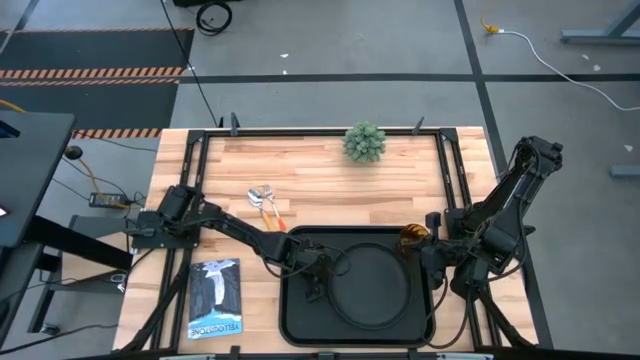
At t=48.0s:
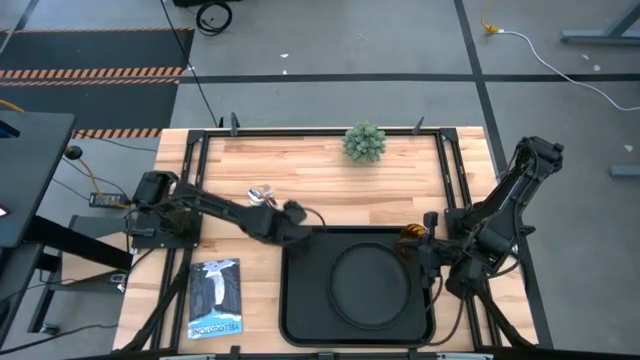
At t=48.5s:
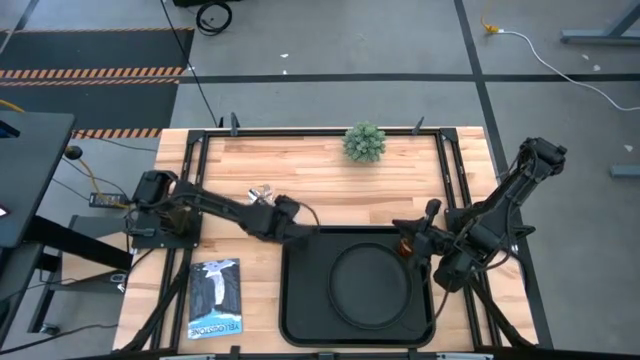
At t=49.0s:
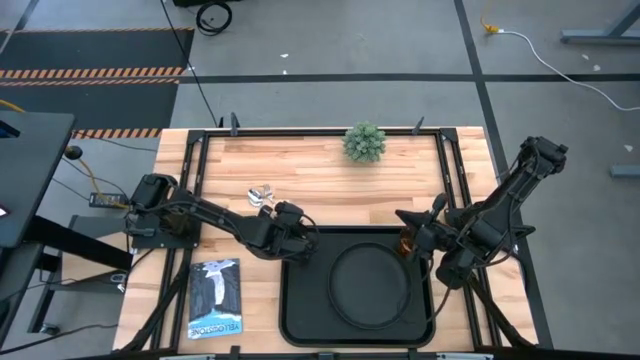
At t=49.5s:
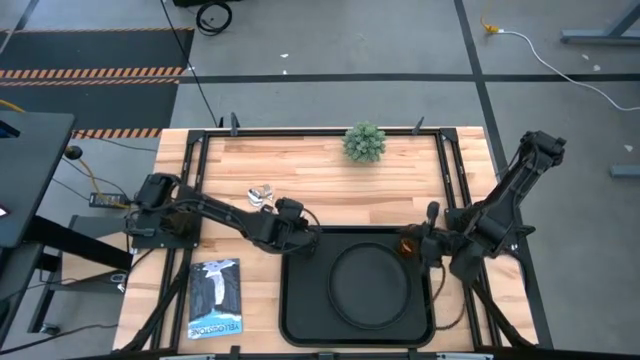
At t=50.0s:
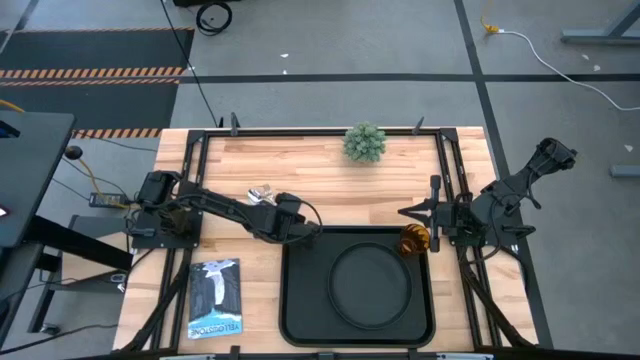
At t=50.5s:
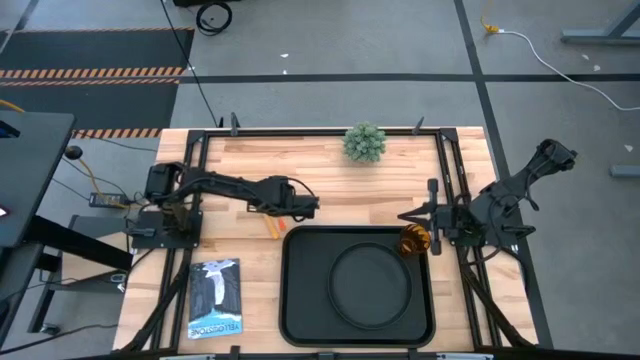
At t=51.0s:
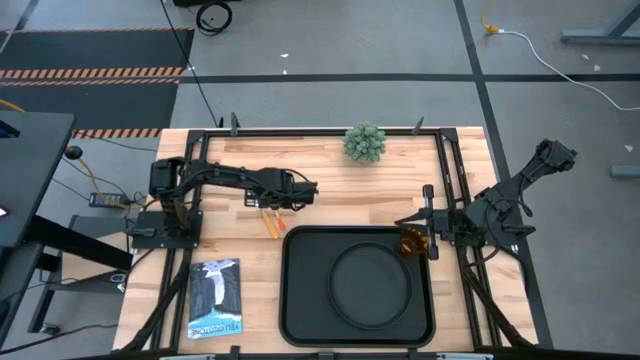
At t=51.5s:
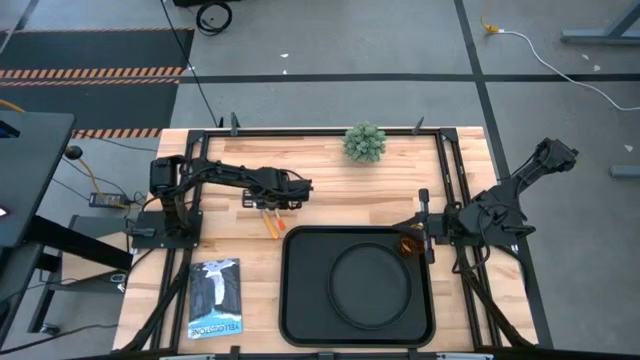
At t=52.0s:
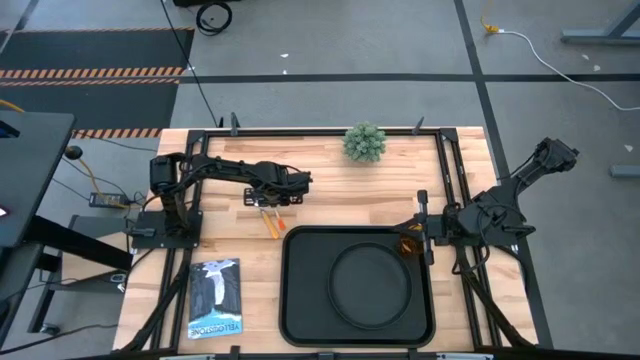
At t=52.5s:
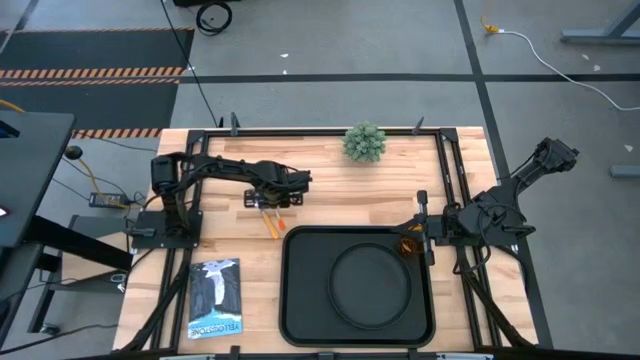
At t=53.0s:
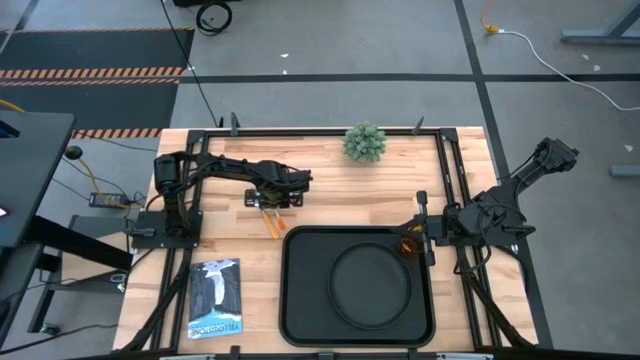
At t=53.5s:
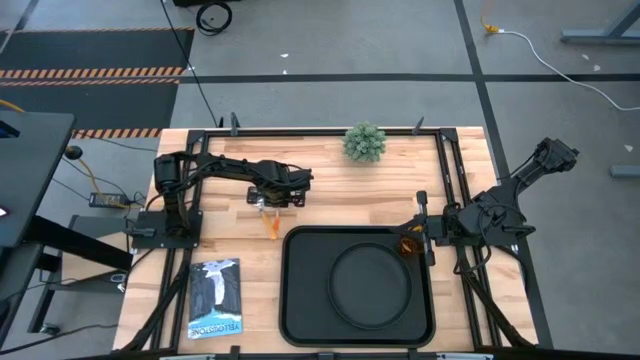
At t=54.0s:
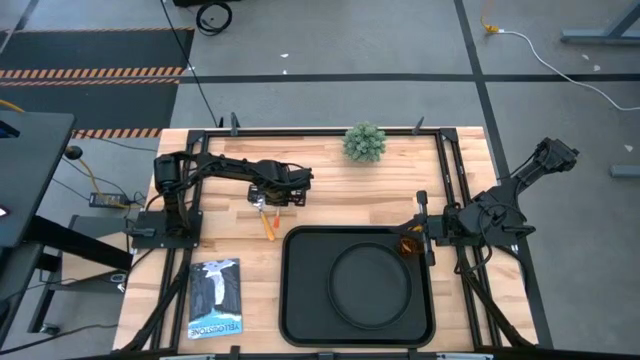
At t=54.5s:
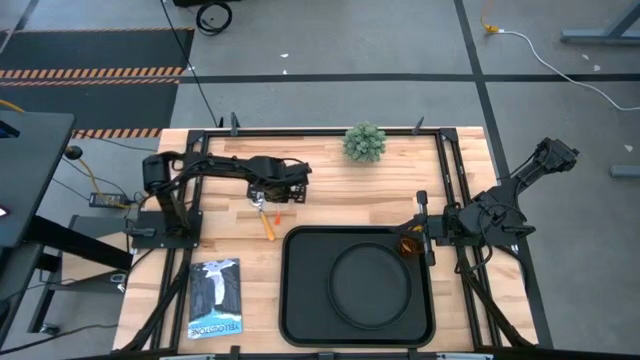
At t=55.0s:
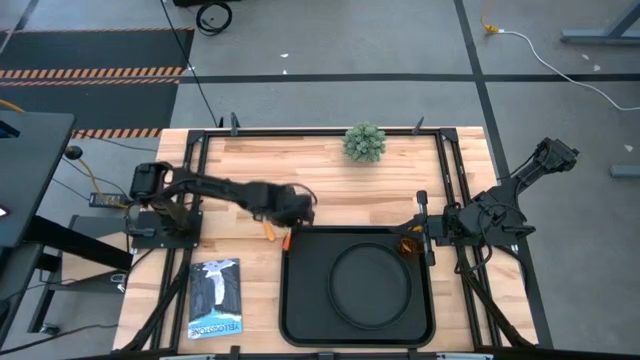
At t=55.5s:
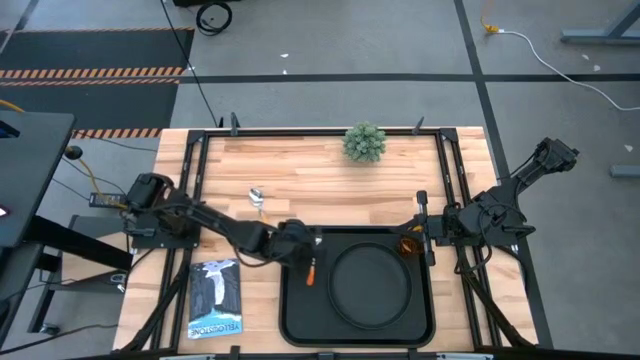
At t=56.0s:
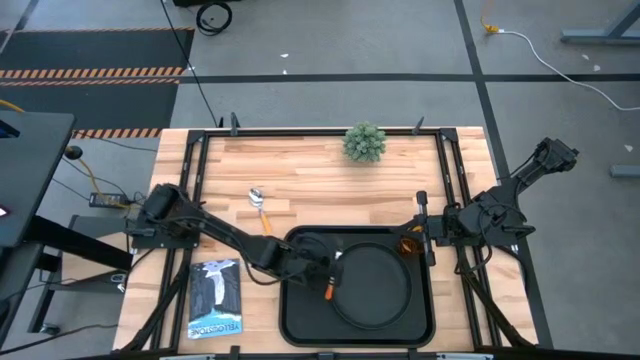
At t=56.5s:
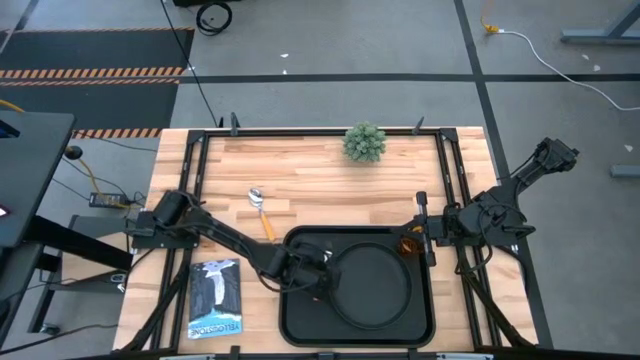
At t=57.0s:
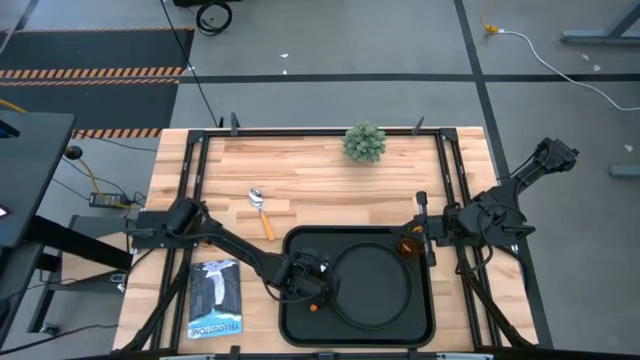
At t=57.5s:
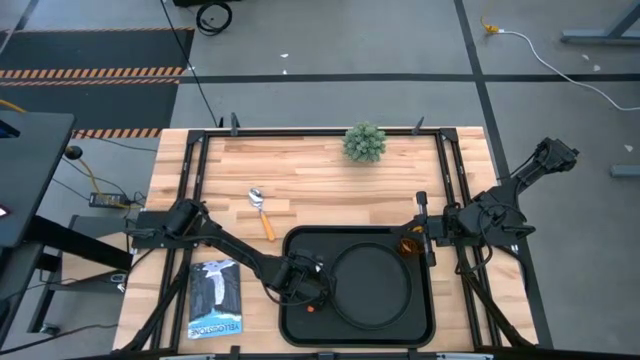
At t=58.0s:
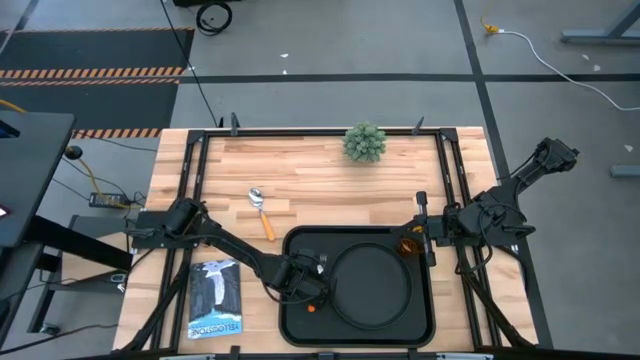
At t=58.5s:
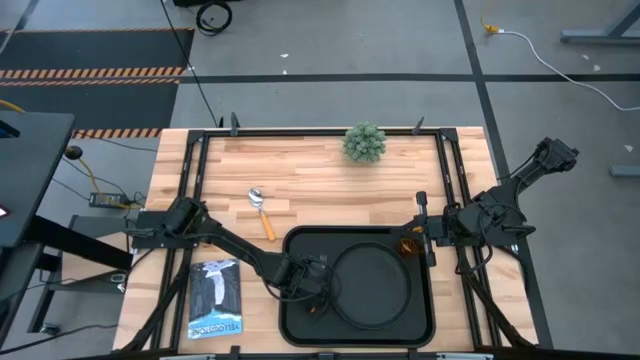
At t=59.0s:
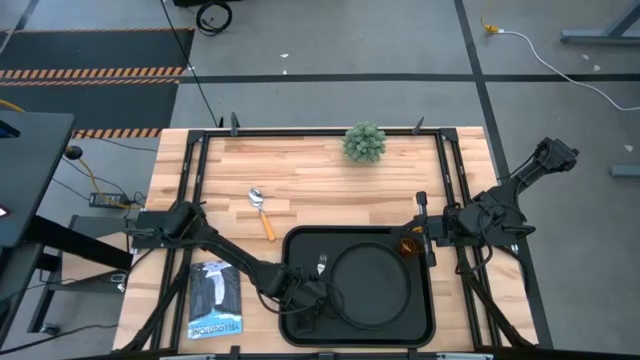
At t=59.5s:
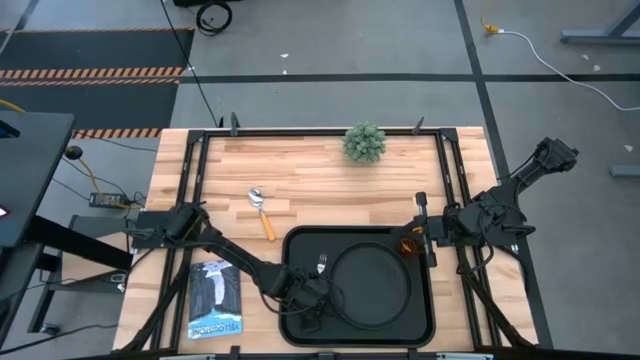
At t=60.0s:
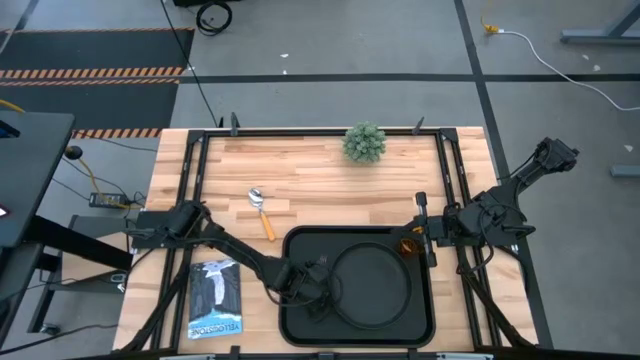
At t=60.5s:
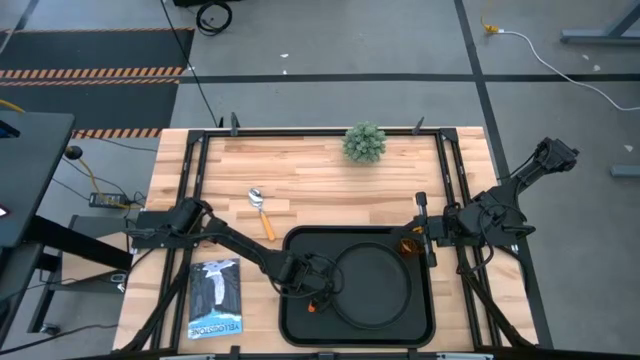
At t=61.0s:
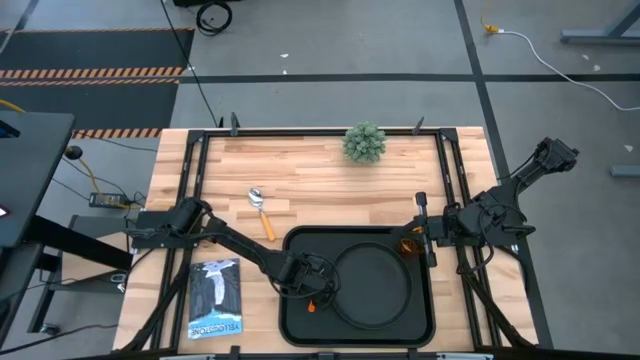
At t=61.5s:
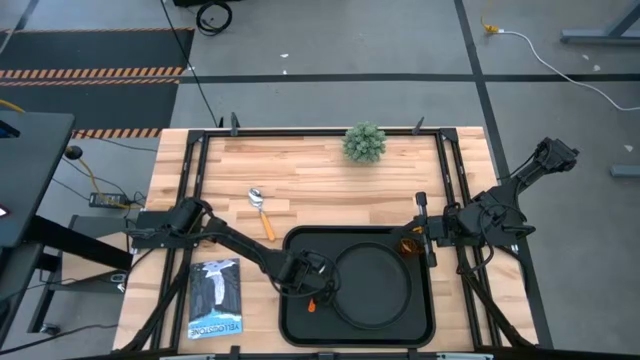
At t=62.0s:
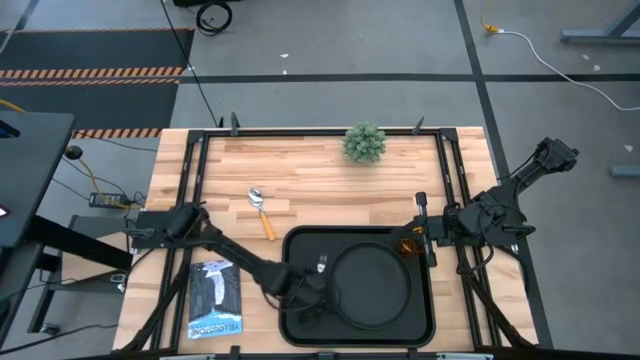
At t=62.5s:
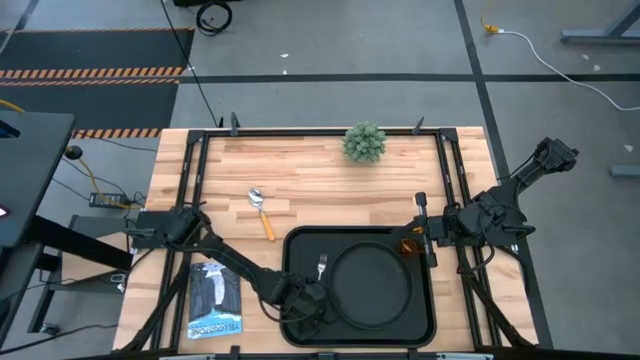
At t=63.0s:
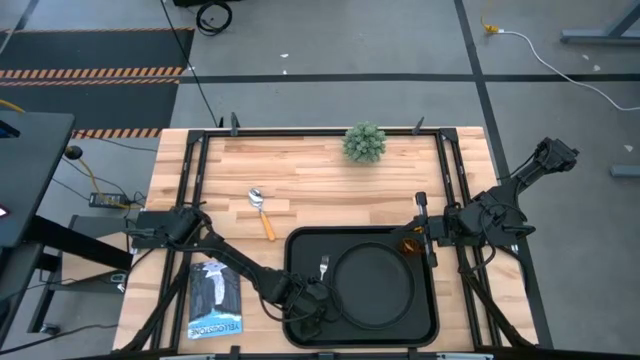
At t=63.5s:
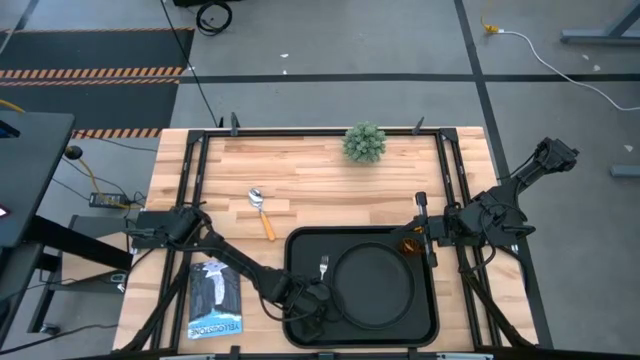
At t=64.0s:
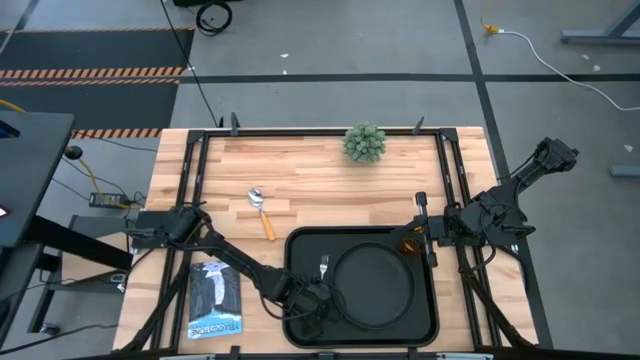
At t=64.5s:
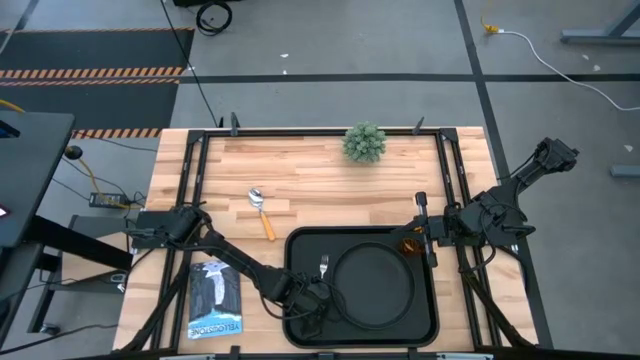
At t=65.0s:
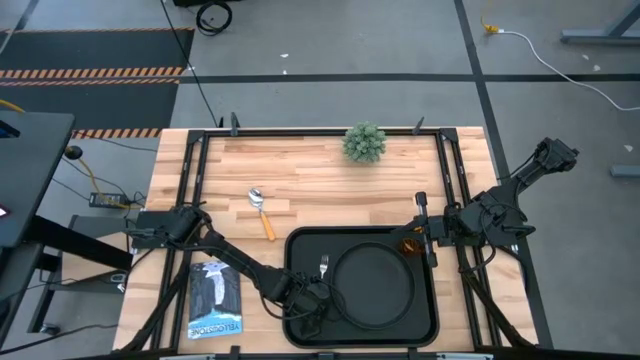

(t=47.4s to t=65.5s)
Task: Pick and place plate/cup/fork/spoon on tray
Put the orange fork to the left of the black plate on the black tray

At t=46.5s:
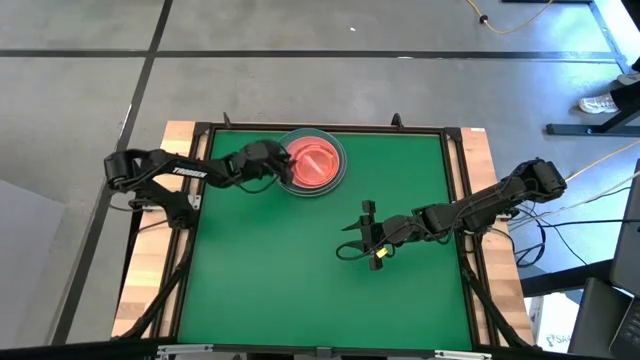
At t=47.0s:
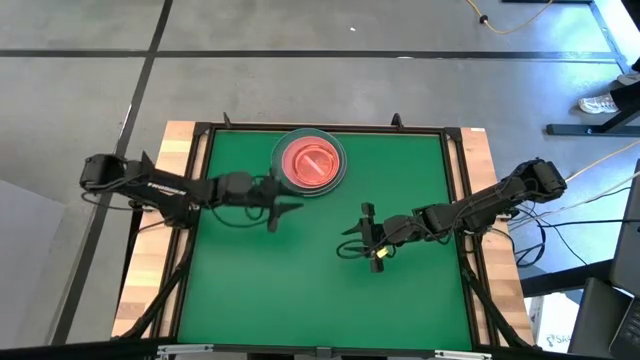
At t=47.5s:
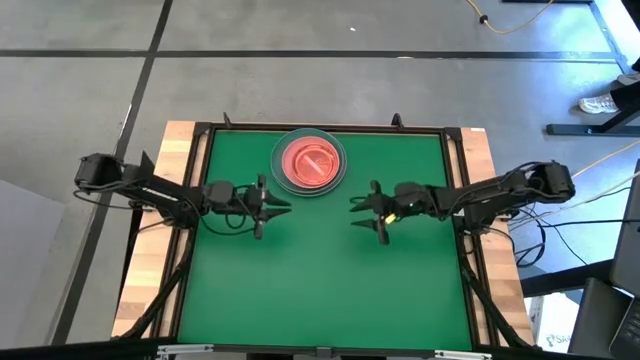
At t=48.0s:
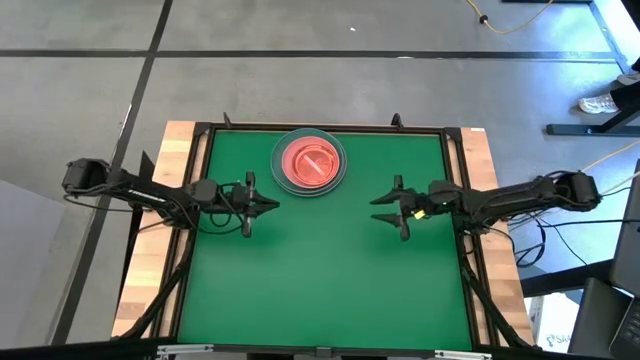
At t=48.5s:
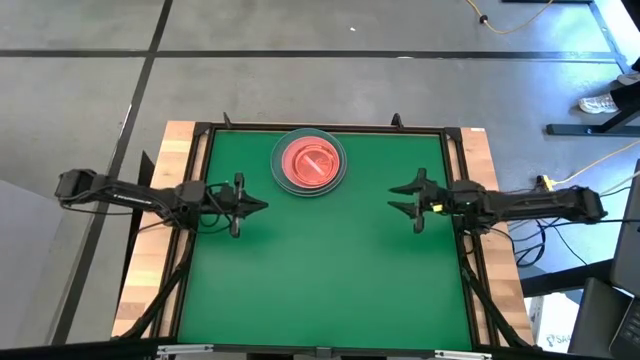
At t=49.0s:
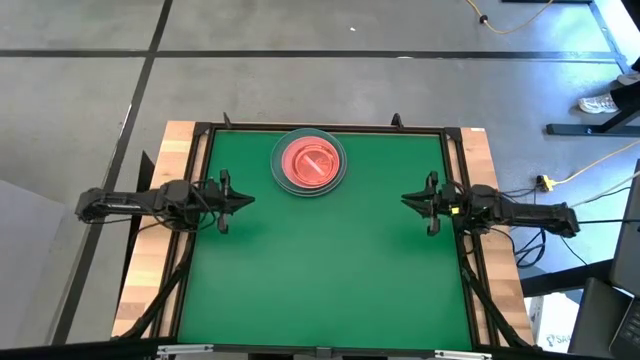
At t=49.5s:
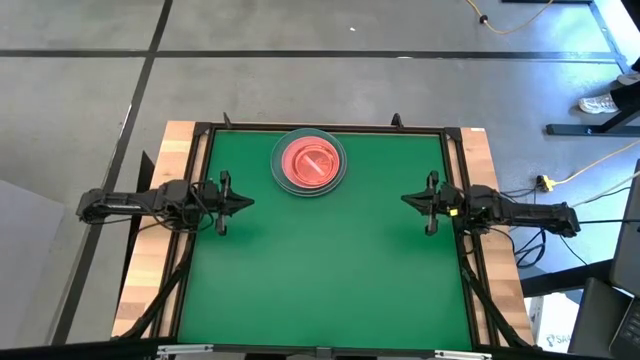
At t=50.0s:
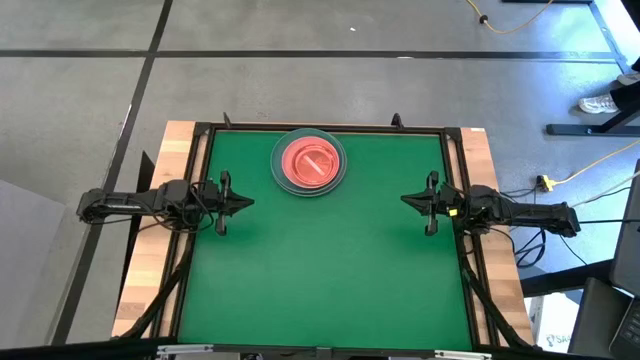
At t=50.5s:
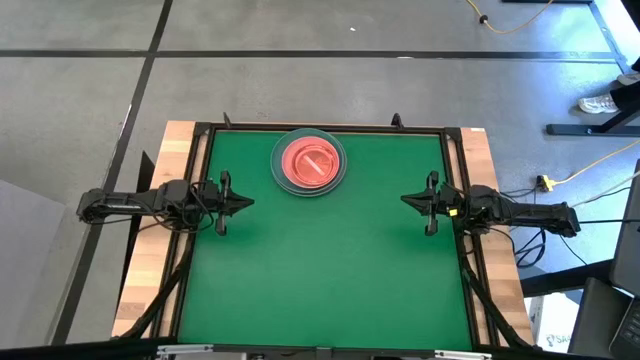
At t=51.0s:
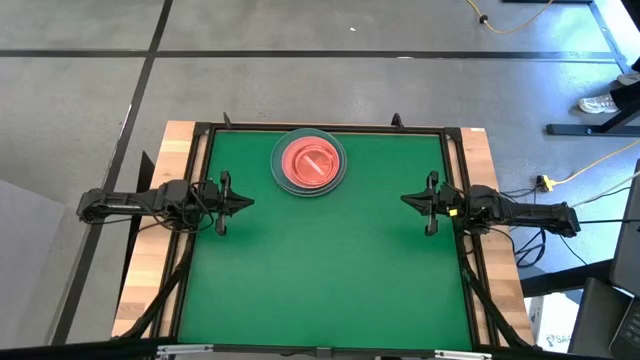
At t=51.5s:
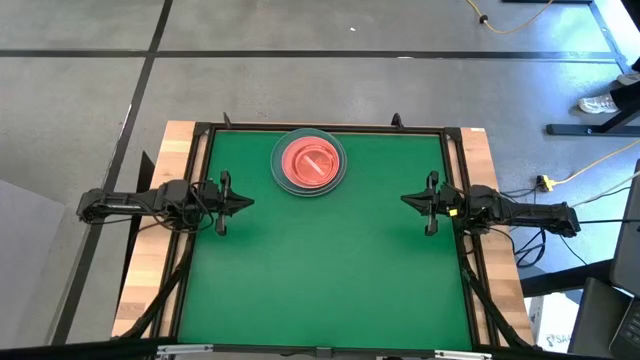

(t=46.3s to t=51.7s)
Task: Stack plastic plates
Return to Home Position
